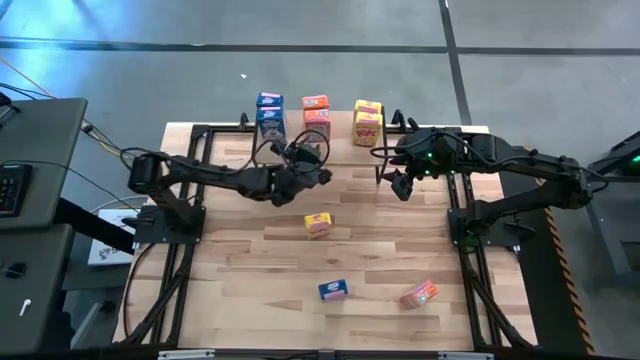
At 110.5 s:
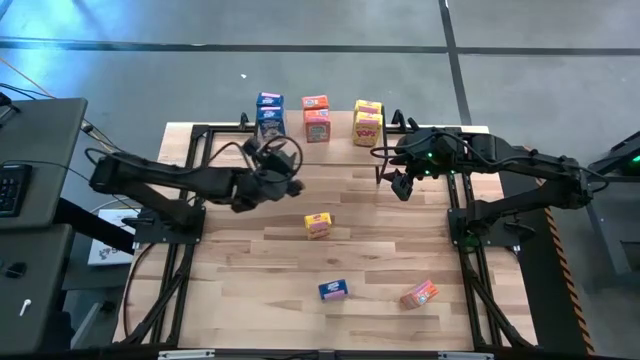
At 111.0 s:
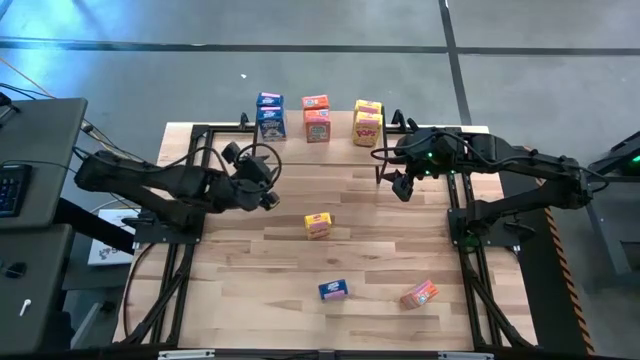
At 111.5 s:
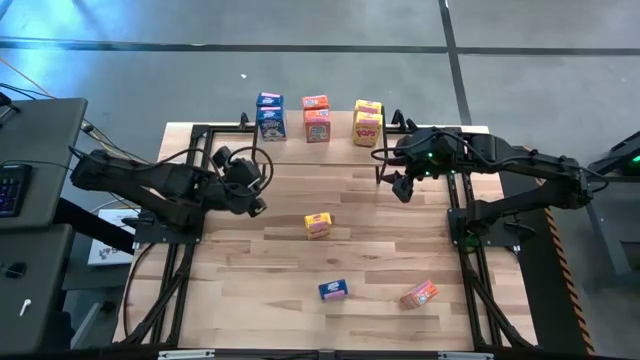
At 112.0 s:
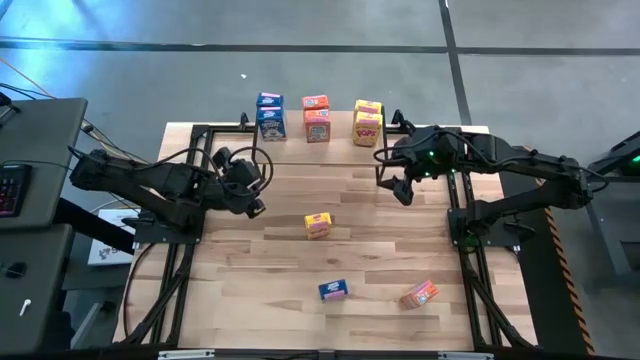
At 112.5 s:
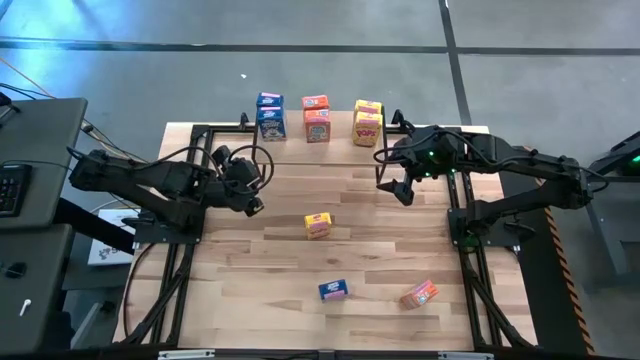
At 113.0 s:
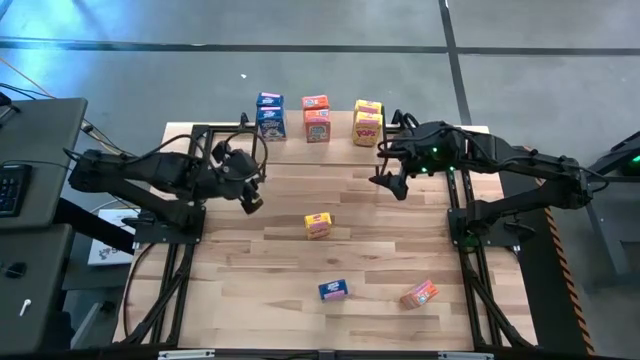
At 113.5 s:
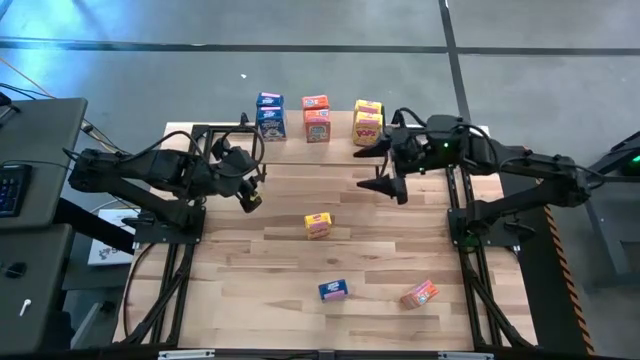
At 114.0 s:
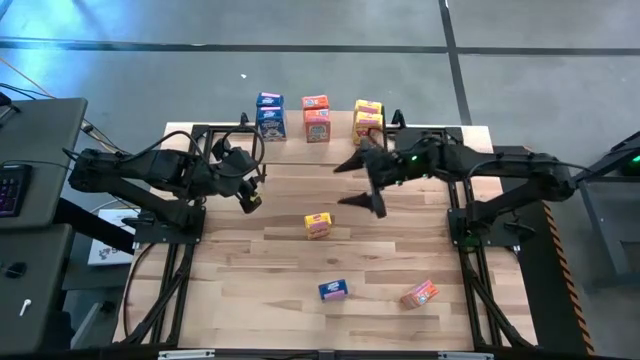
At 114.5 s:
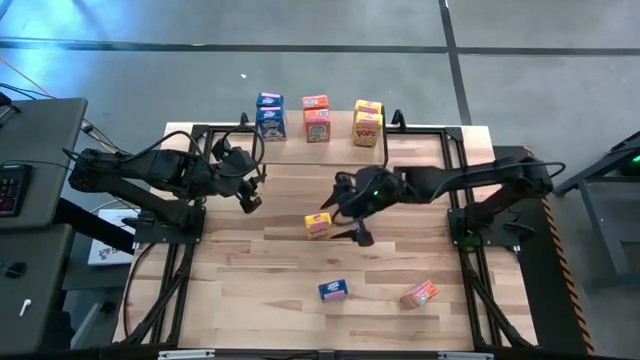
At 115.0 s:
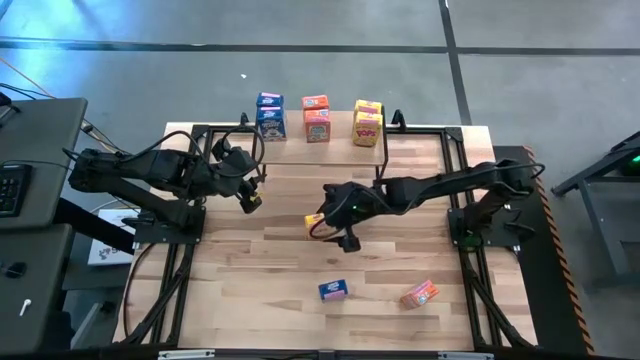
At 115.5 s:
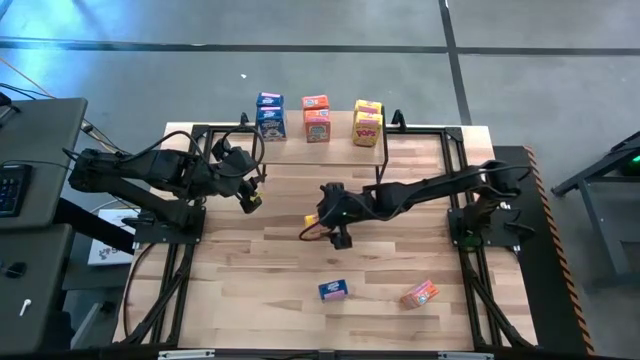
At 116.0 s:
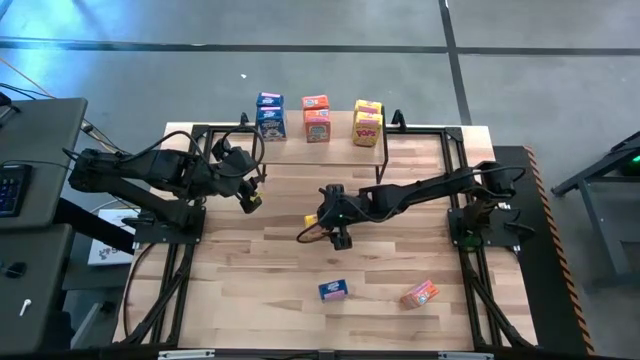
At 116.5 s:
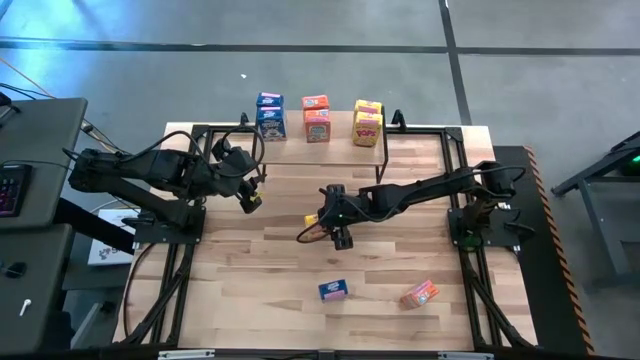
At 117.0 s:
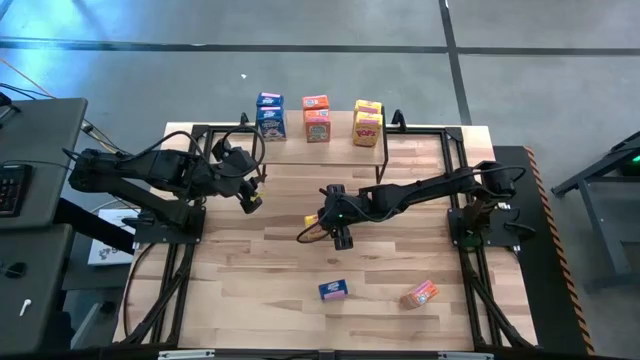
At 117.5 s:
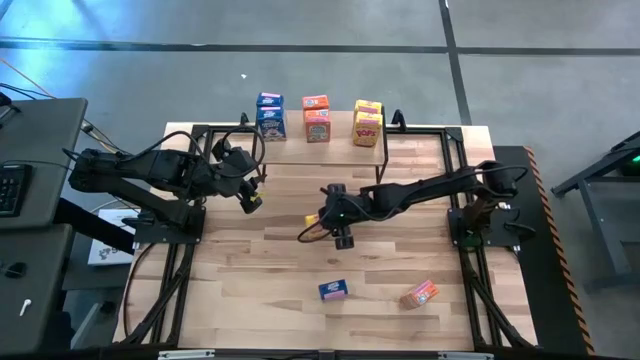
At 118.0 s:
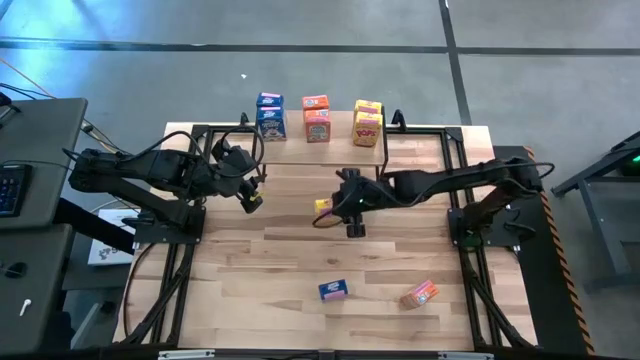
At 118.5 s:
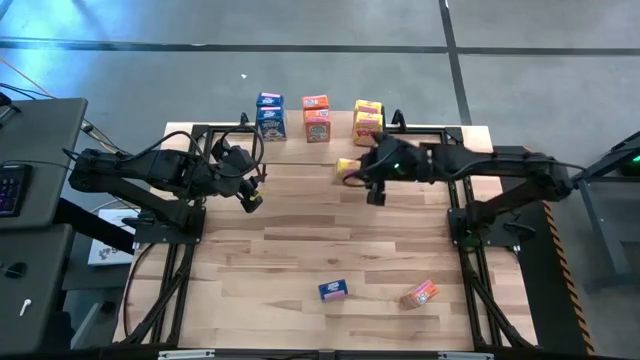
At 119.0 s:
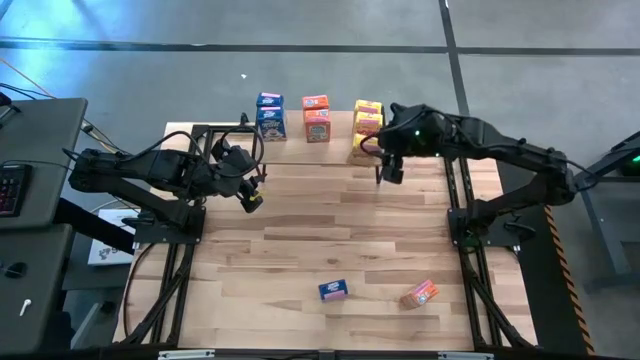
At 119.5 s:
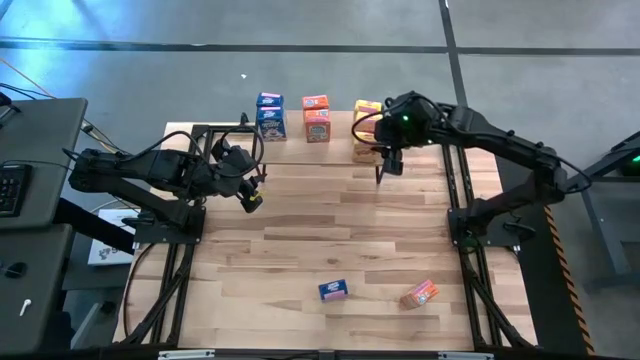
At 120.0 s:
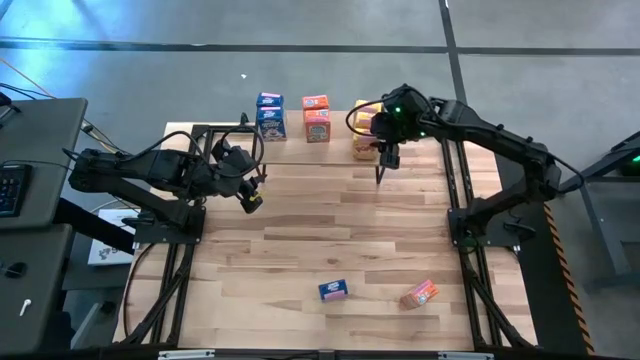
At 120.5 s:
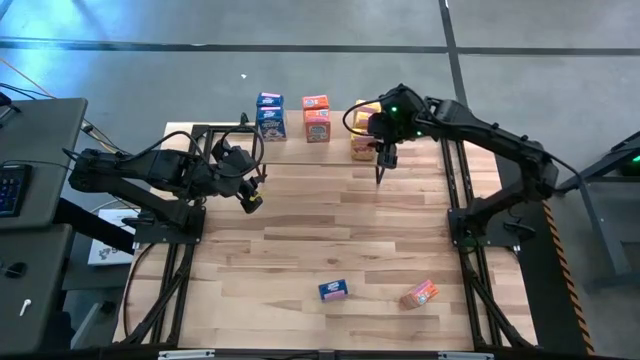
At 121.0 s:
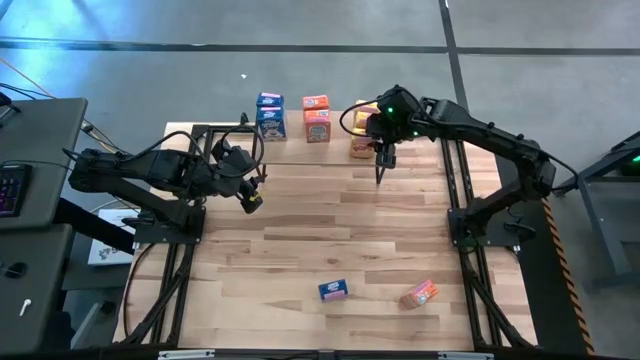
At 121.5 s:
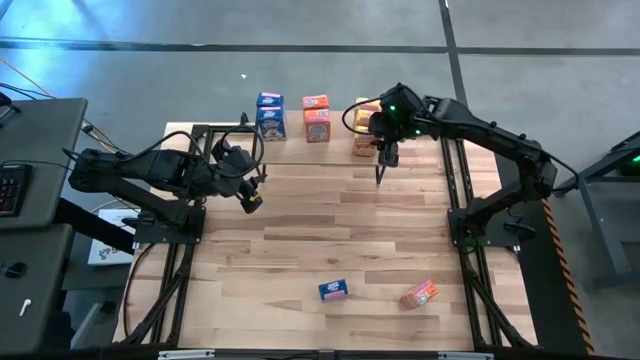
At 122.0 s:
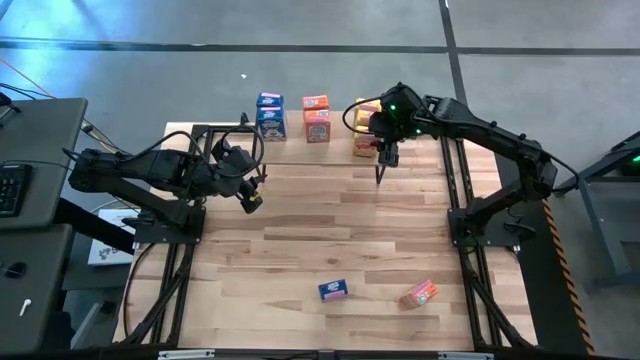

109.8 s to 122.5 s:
Task: Stack cereal on shelf
Put the yellow cereal box on the shelf aligned with the other yellow cereal boxes
